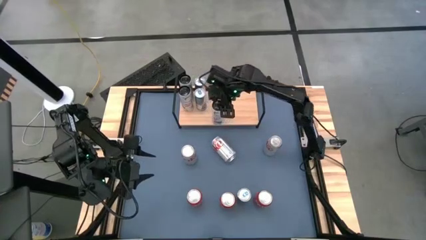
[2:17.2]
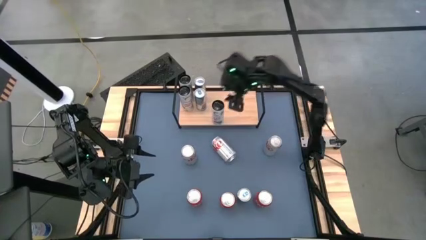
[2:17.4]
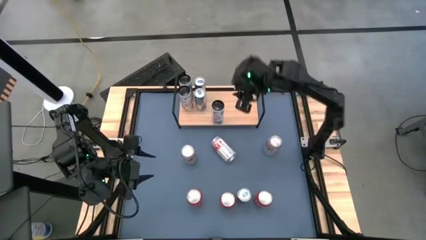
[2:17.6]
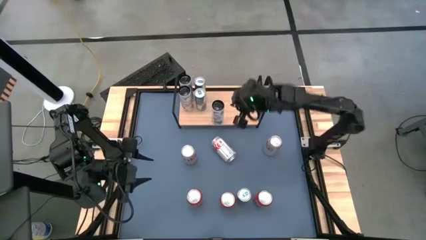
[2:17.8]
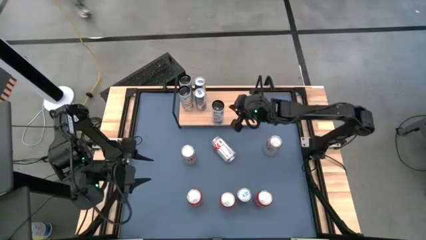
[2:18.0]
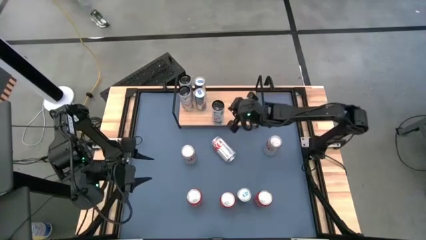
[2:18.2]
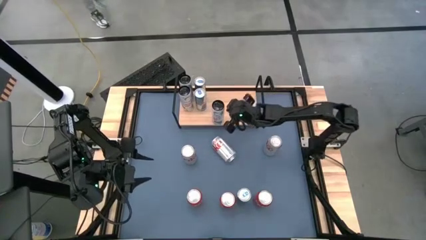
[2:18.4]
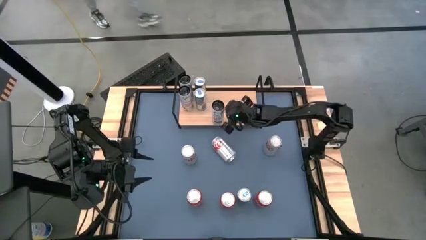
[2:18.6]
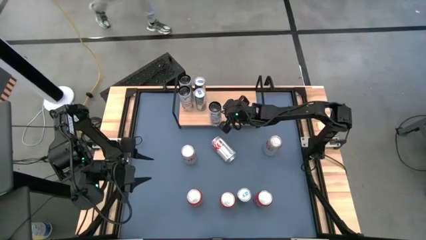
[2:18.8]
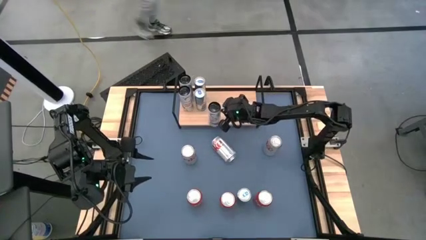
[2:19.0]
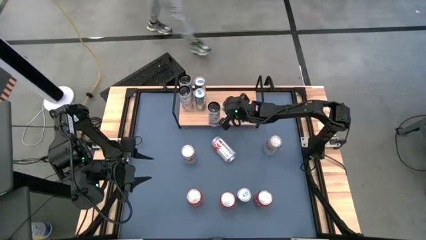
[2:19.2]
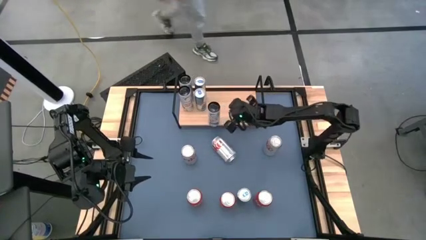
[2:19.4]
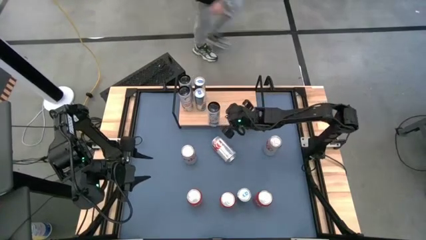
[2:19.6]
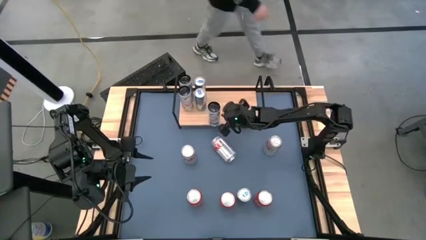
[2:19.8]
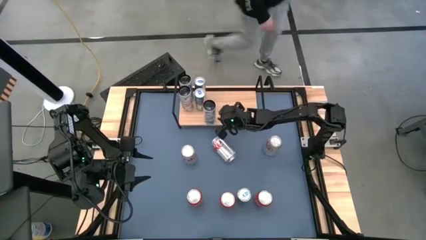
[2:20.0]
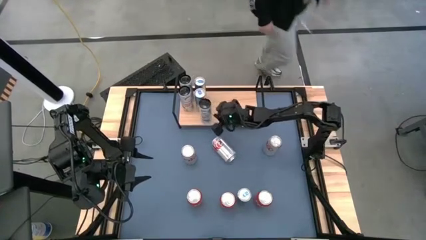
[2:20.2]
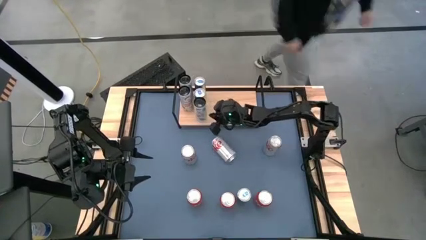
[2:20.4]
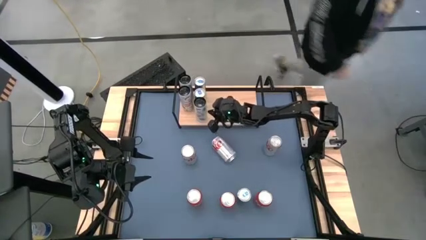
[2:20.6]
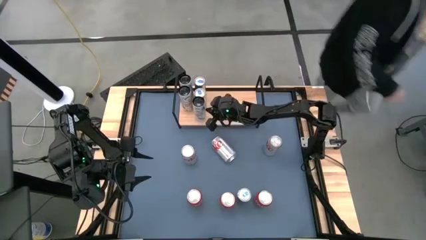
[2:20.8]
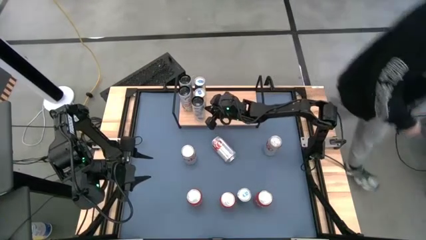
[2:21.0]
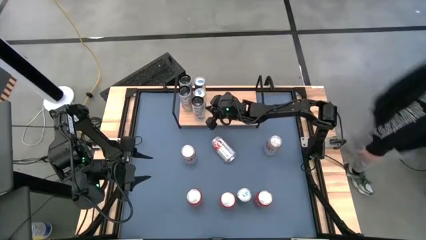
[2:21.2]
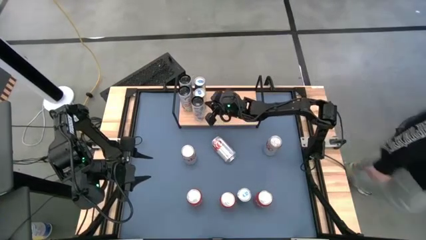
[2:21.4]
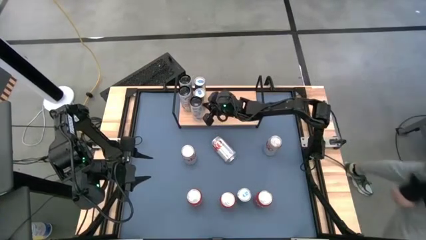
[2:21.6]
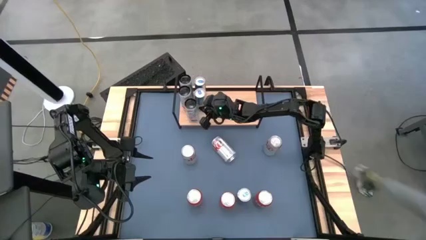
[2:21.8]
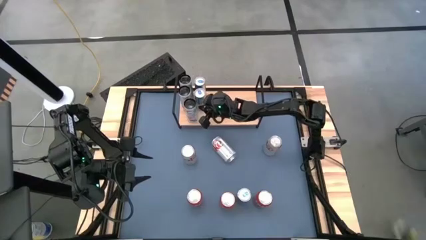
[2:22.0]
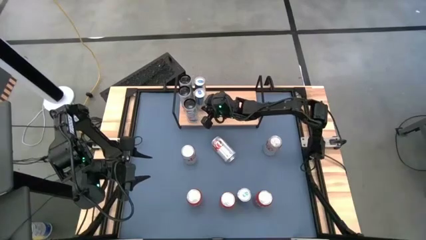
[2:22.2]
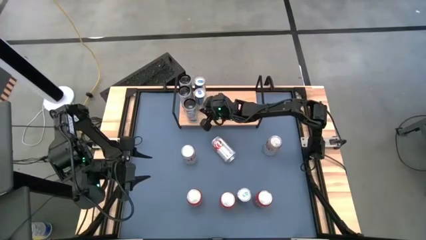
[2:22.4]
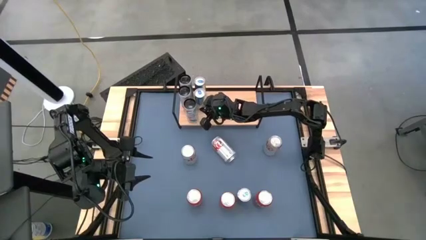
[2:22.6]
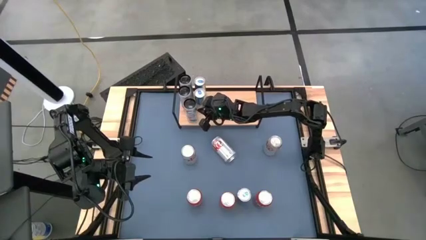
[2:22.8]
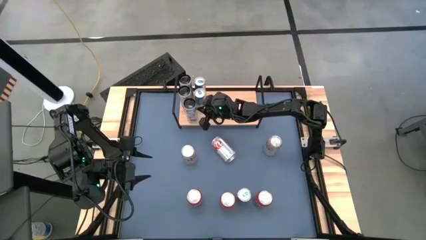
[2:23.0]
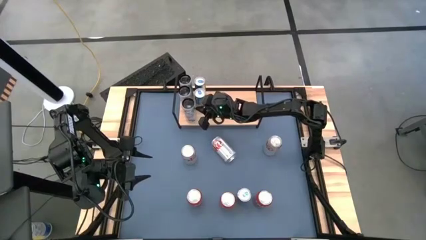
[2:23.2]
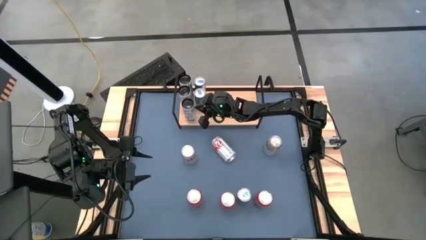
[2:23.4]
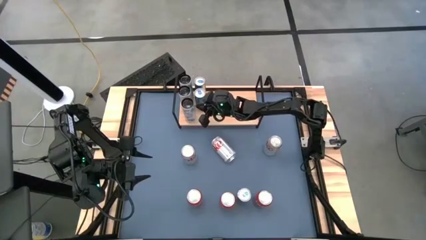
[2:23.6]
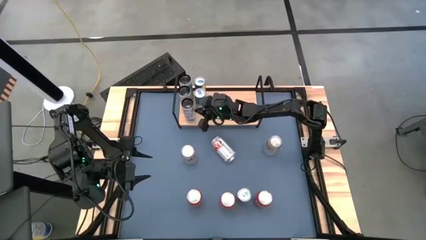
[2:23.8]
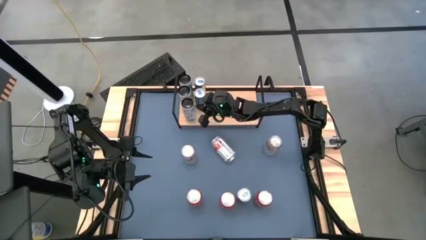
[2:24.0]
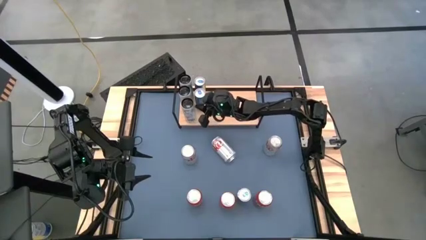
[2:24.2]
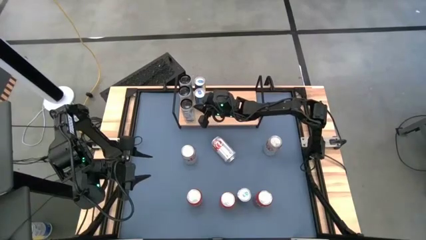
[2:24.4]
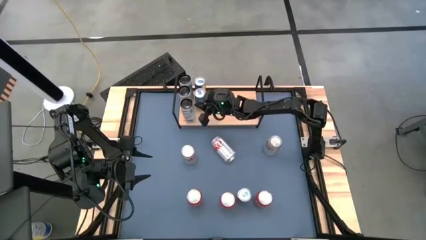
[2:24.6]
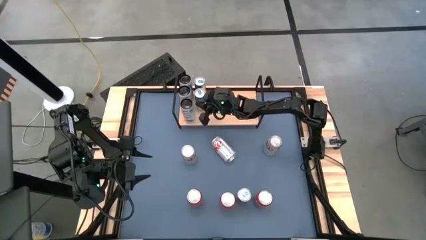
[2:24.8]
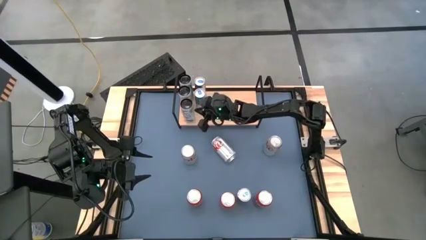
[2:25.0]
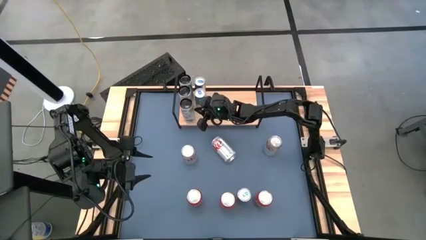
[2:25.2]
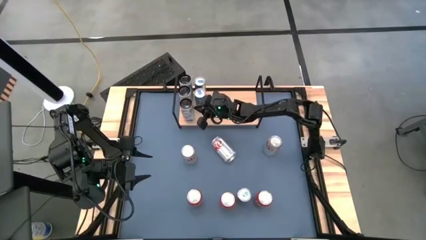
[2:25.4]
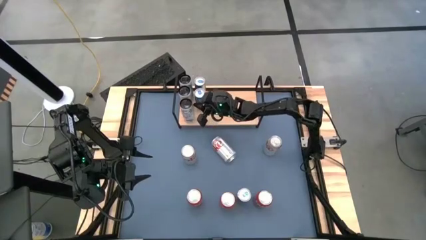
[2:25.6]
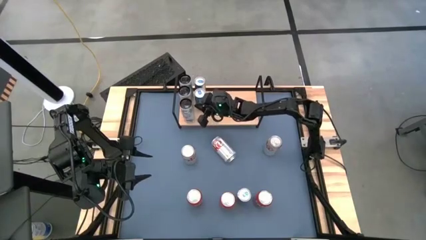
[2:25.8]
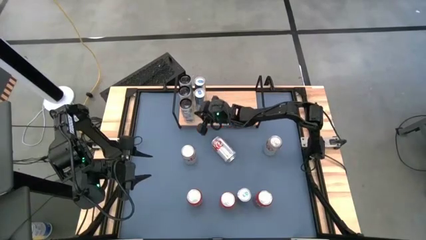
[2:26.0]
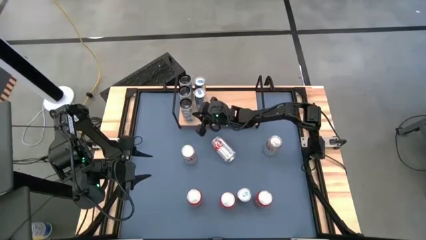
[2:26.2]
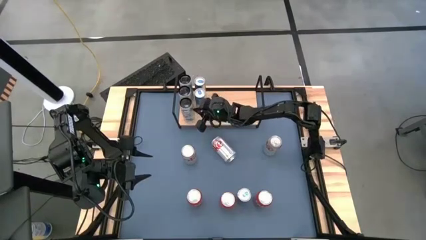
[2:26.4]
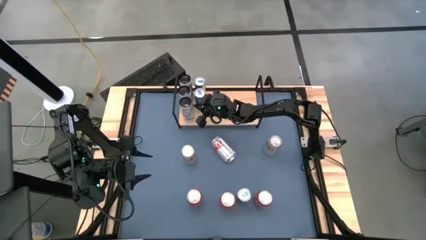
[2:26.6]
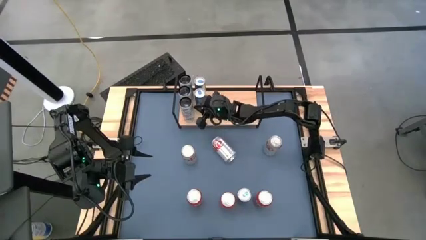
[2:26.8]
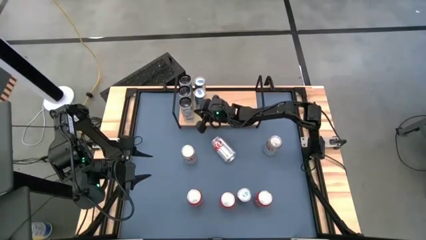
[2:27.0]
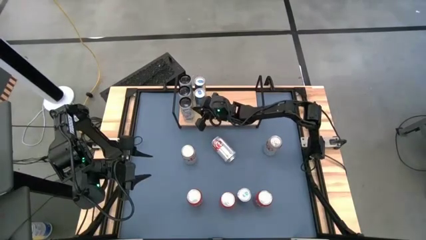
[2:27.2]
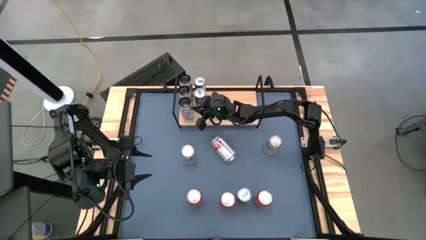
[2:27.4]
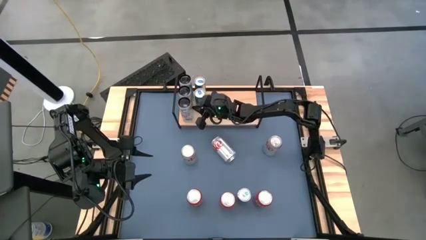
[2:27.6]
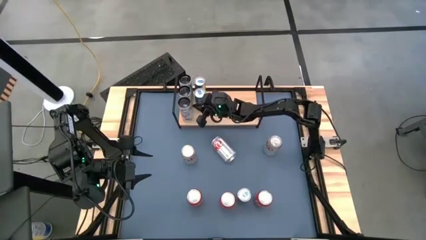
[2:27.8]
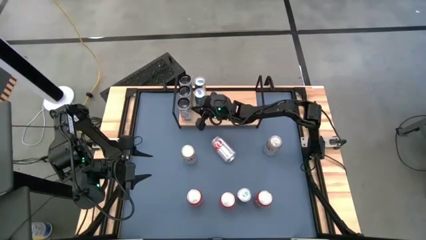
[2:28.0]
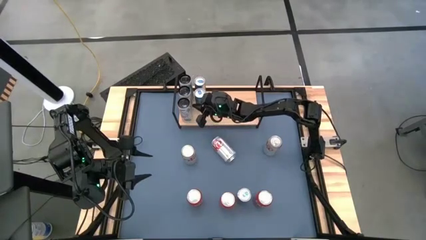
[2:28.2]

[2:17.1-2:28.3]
Task: Place canned beverage on shelf
Put the white and pink soda can aligned with the other white and pink soda cans on the shelf

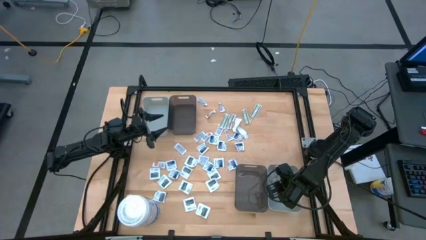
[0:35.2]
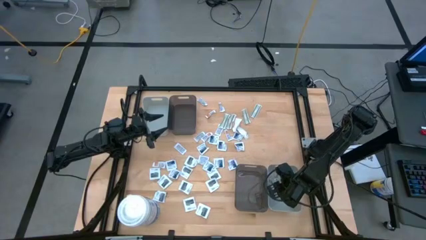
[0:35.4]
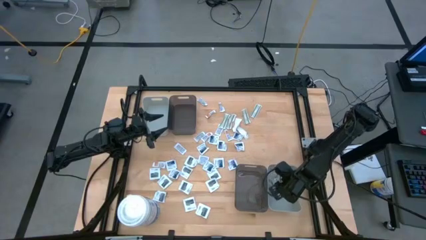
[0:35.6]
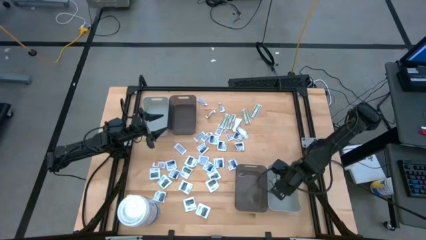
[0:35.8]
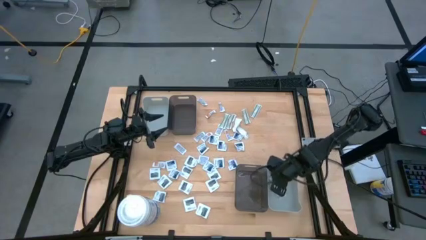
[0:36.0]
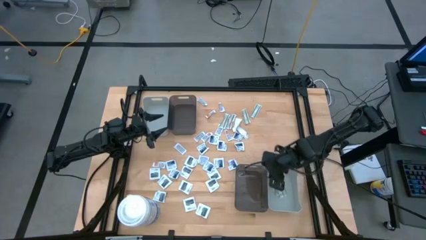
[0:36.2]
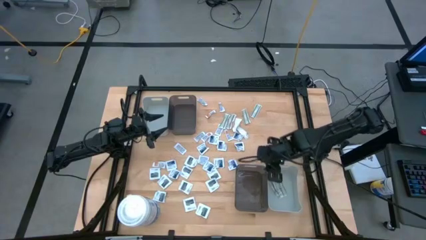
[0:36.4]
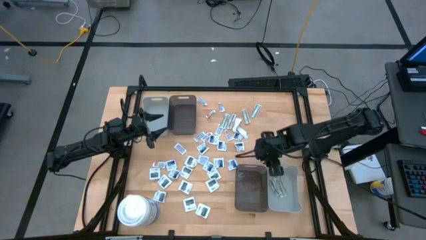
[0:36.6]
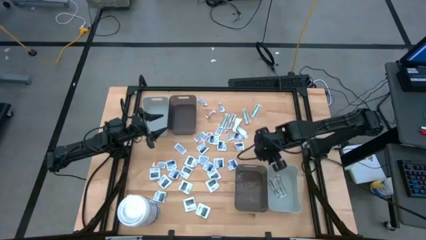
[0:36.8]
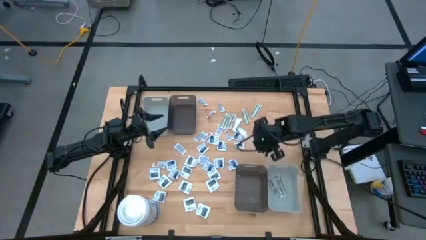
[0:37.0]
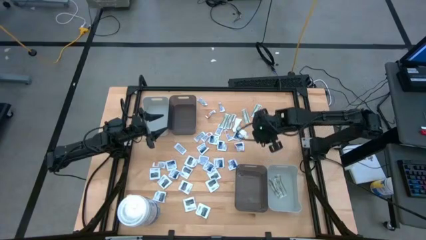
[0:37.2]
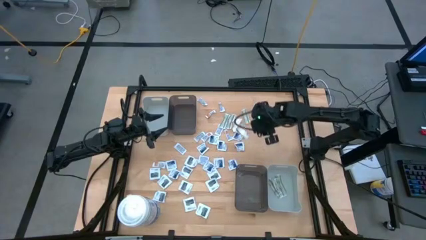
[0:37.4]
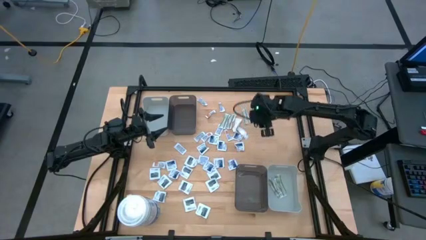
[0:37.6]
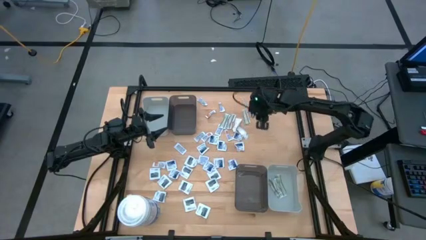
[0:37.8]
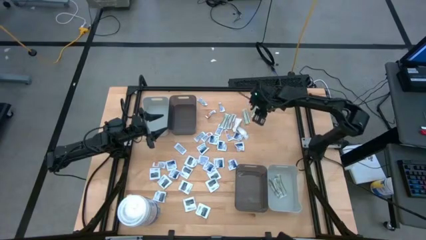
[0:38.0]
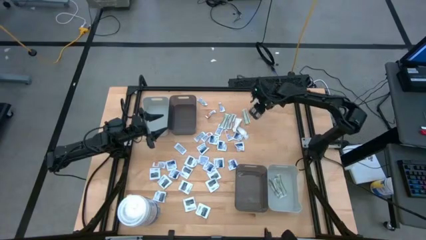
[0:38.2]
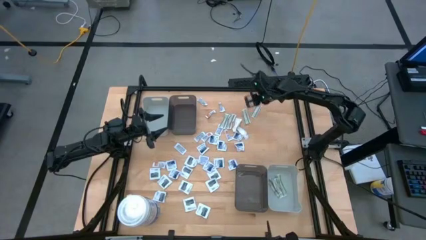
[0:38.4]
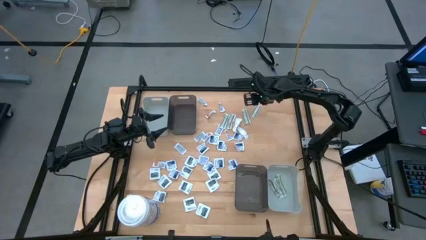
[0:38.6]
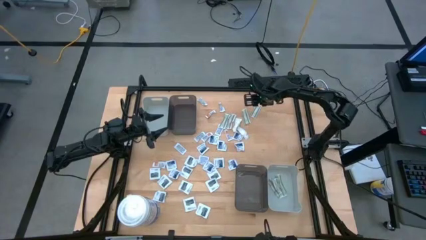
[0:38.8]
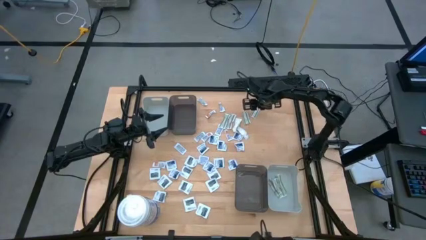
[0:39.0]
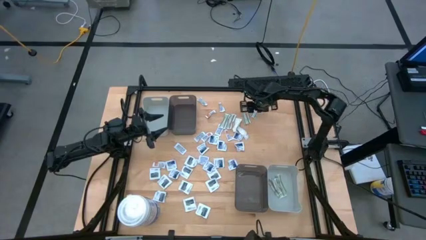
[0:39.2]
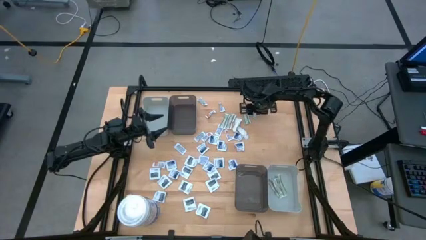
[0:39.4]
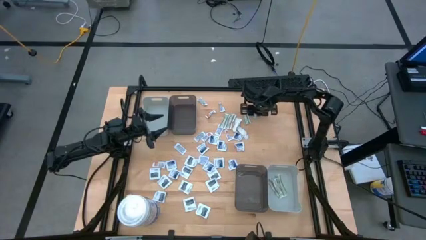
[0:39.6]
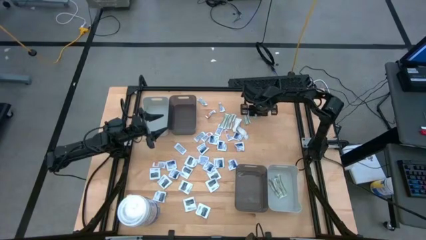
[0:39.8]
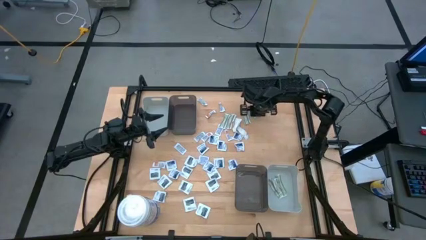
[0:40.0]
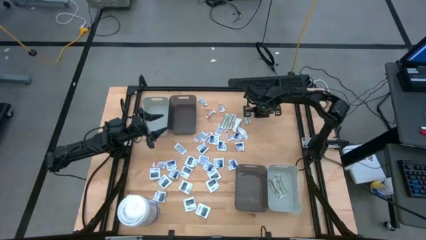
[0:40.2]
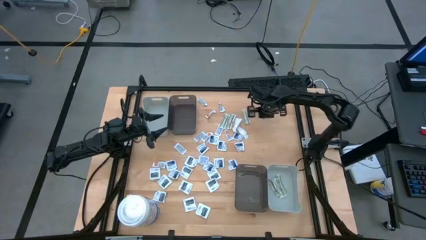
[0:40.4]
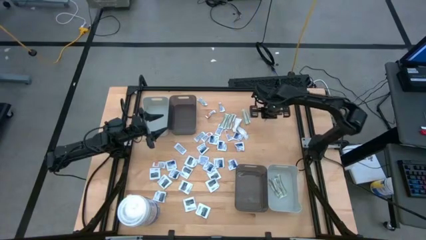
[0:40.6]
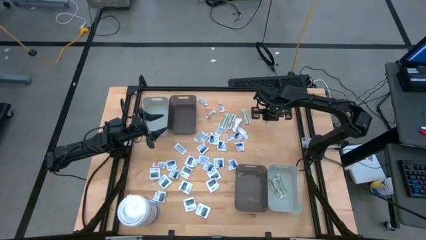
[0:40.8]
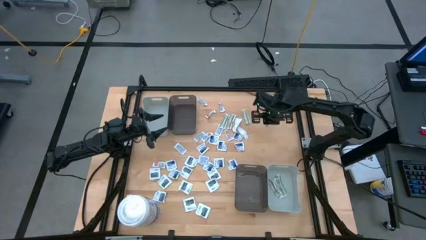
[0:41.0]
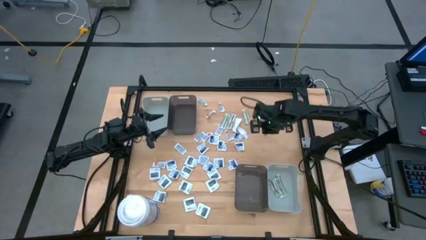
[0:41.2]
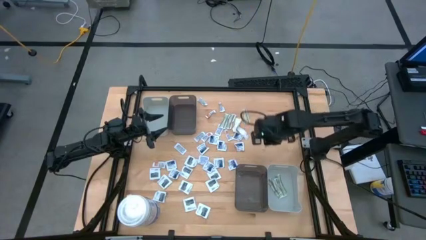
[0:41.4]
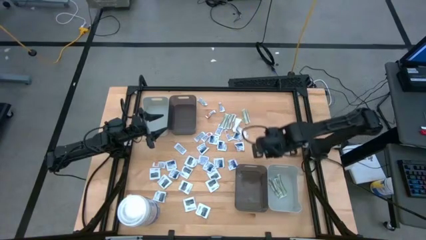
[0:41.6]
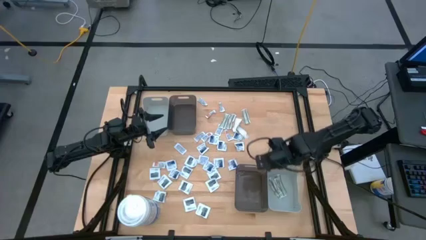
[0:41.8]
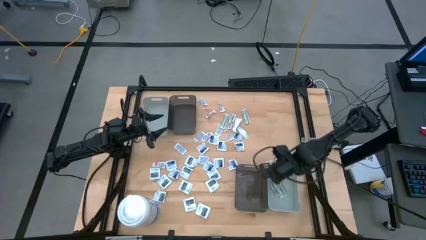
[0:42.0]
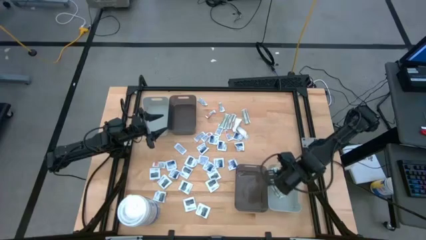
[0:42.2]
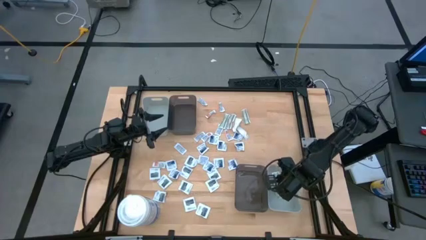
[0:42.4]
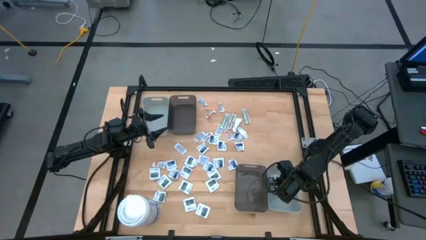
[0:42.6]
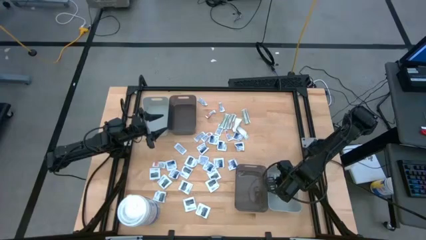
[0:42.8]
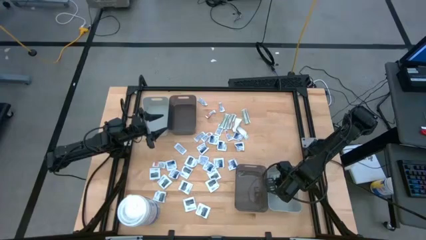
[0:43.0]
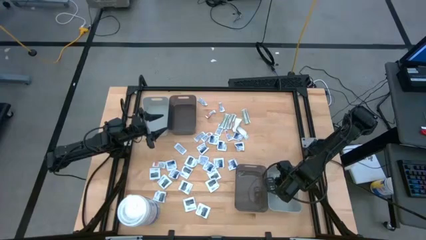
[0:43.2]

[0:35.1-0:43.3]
Task: Pick & Place First Aid Supplies
Put the white bandage pack into the bottom gray bin
